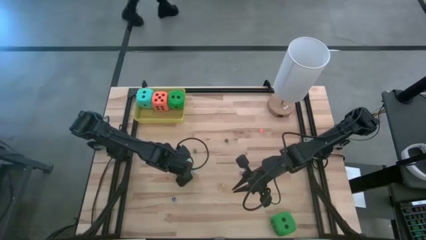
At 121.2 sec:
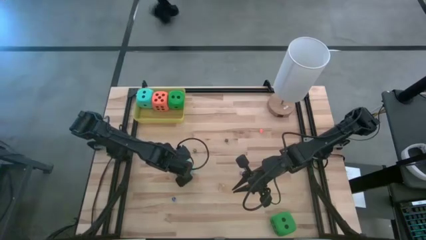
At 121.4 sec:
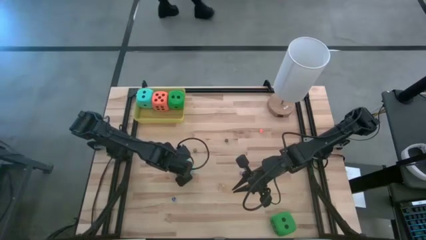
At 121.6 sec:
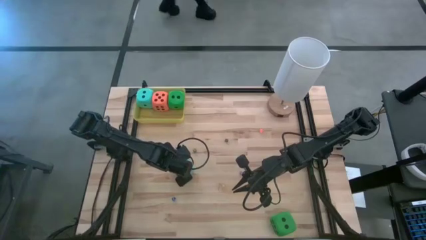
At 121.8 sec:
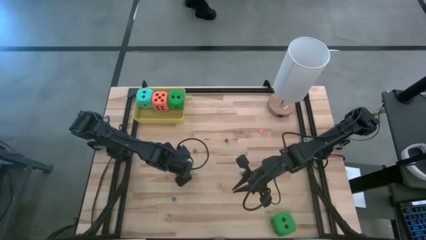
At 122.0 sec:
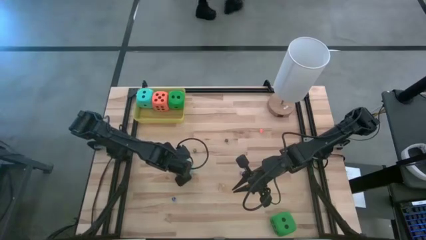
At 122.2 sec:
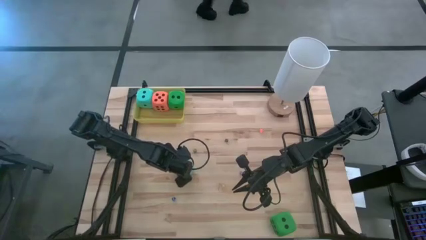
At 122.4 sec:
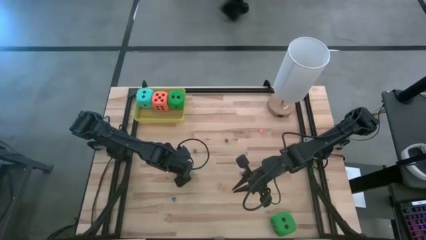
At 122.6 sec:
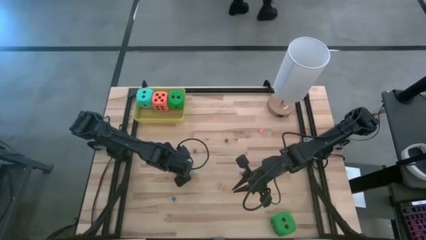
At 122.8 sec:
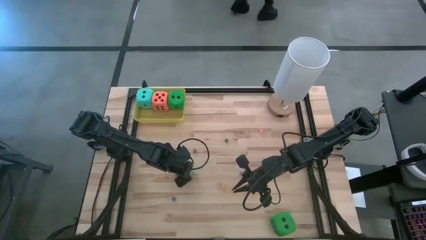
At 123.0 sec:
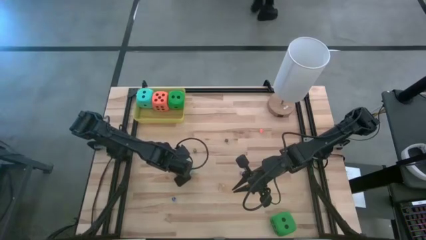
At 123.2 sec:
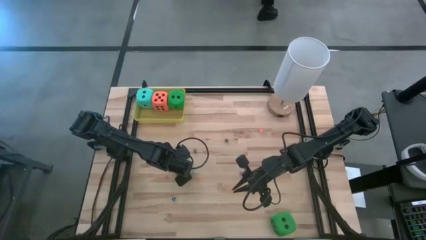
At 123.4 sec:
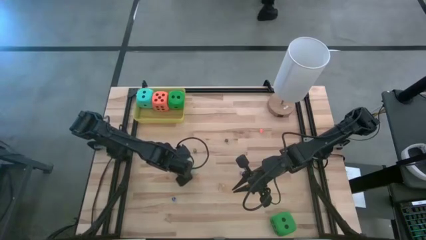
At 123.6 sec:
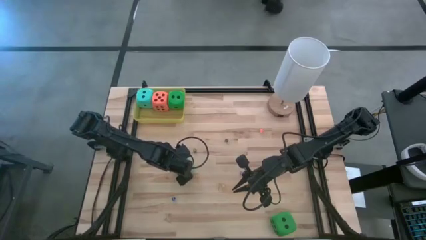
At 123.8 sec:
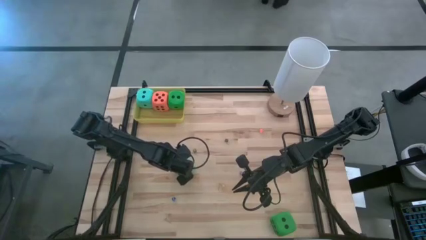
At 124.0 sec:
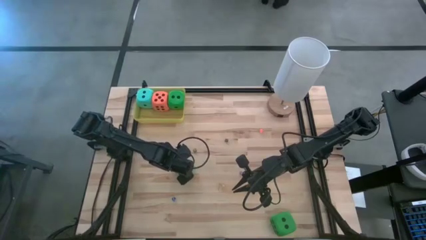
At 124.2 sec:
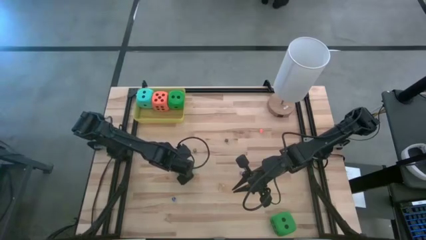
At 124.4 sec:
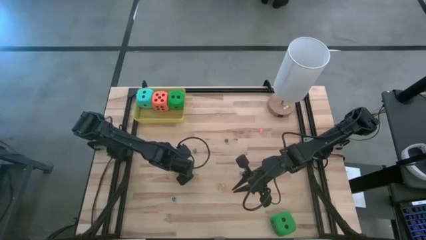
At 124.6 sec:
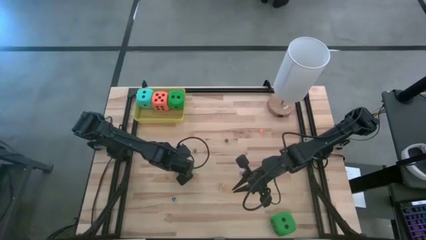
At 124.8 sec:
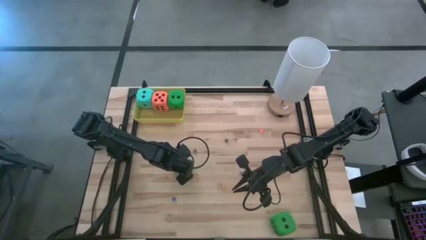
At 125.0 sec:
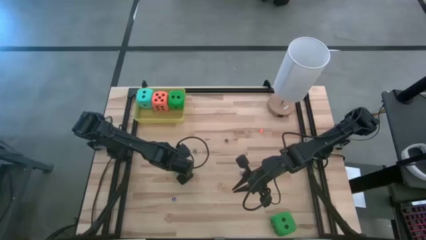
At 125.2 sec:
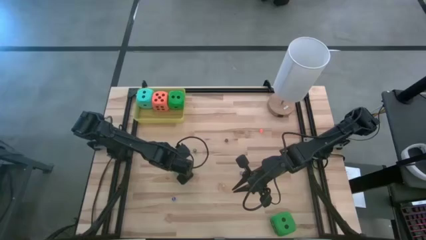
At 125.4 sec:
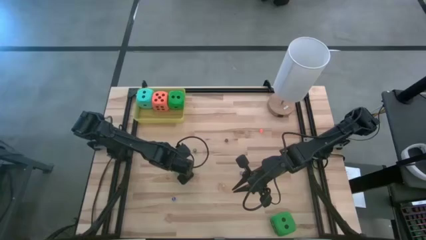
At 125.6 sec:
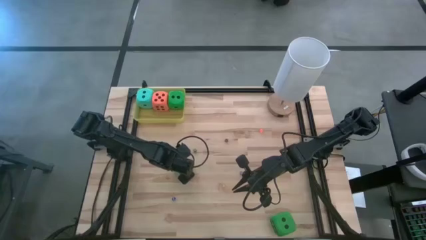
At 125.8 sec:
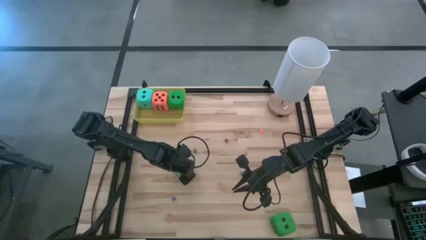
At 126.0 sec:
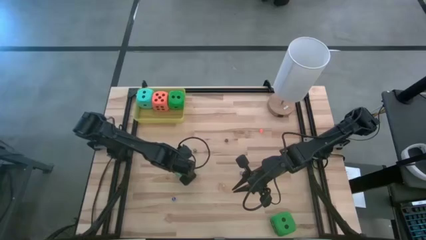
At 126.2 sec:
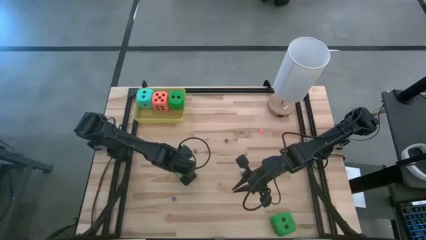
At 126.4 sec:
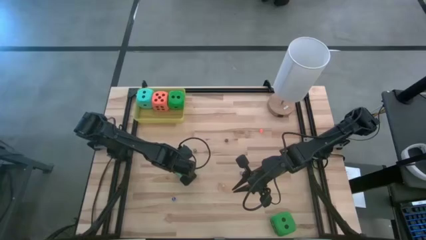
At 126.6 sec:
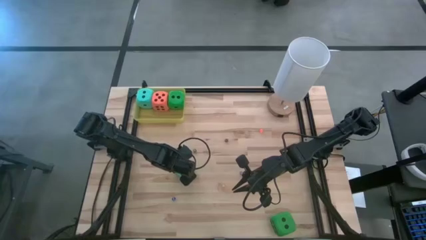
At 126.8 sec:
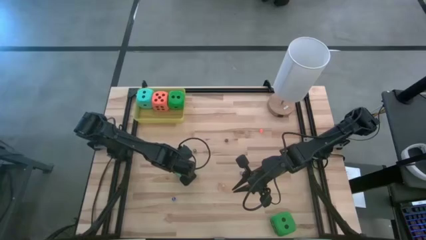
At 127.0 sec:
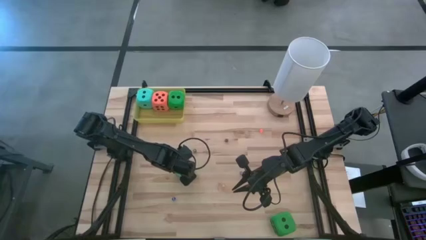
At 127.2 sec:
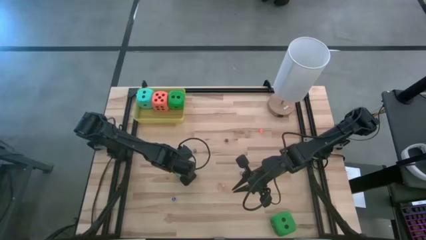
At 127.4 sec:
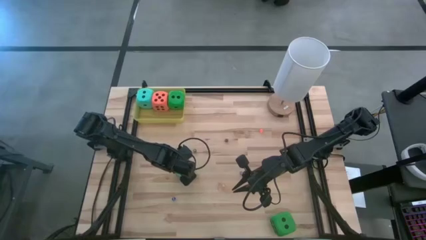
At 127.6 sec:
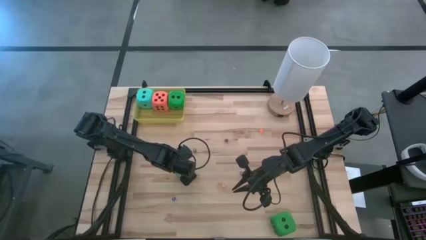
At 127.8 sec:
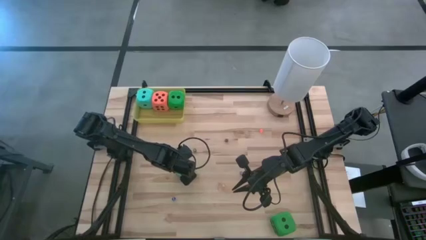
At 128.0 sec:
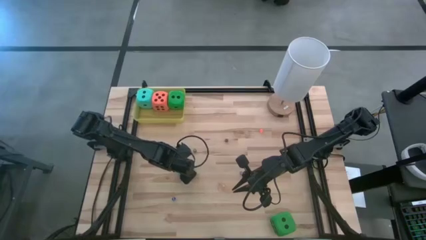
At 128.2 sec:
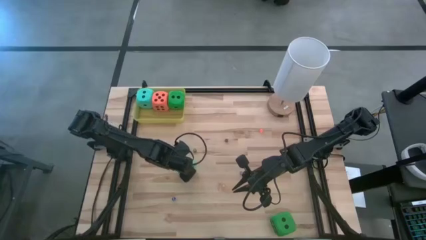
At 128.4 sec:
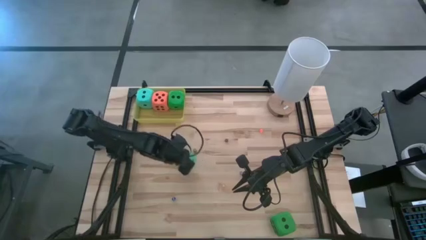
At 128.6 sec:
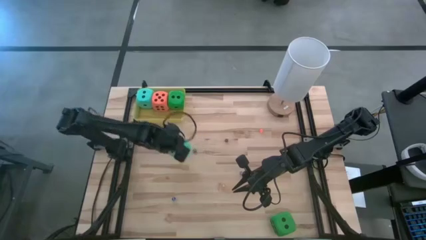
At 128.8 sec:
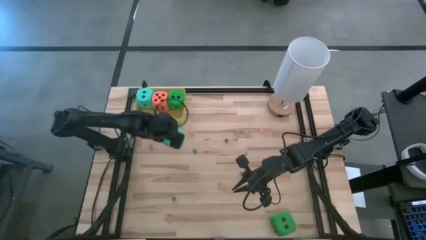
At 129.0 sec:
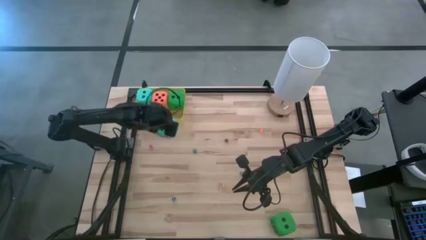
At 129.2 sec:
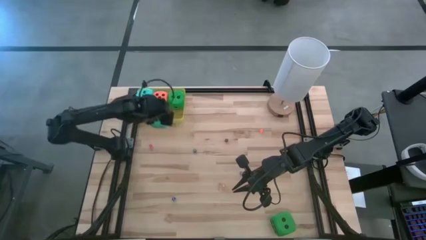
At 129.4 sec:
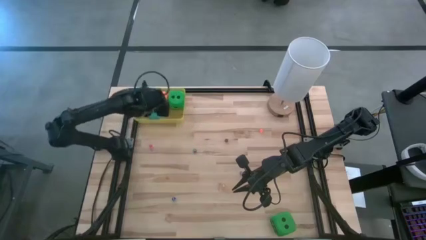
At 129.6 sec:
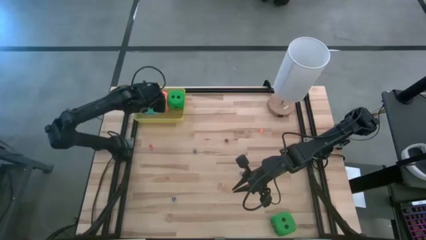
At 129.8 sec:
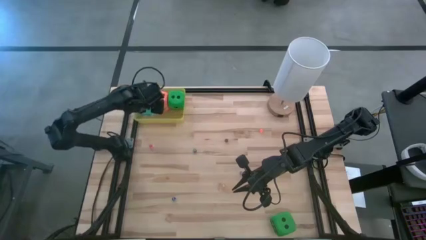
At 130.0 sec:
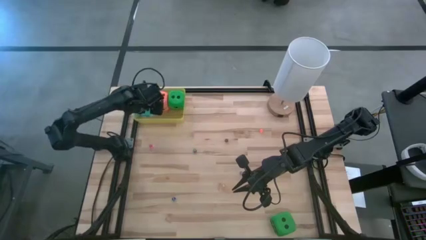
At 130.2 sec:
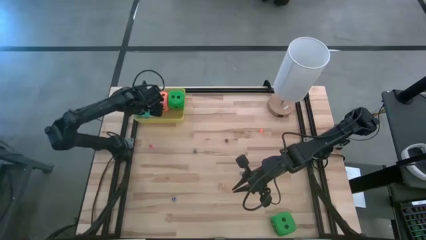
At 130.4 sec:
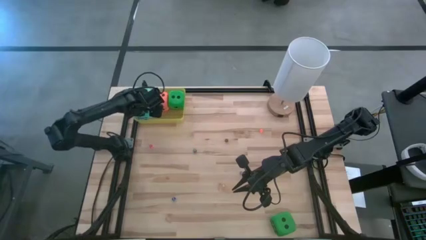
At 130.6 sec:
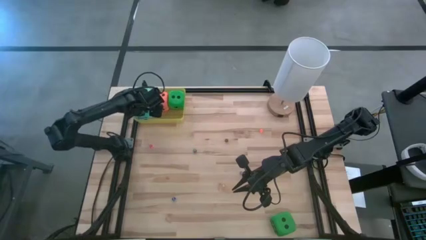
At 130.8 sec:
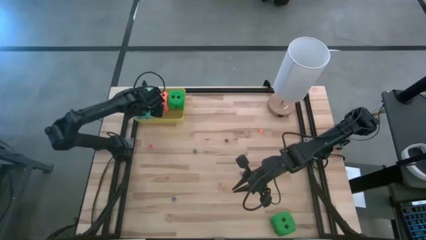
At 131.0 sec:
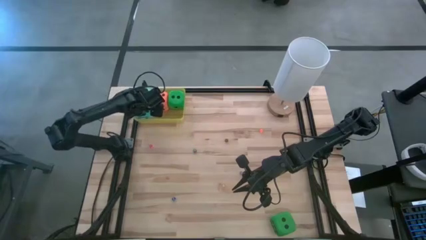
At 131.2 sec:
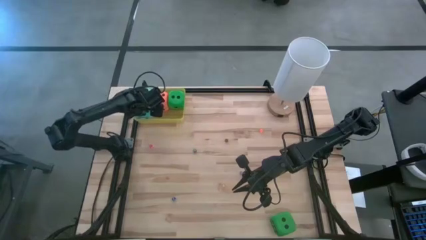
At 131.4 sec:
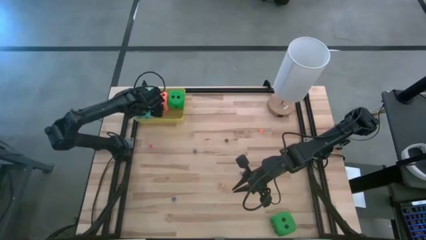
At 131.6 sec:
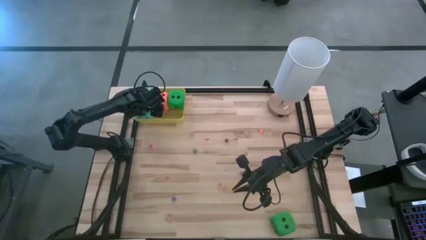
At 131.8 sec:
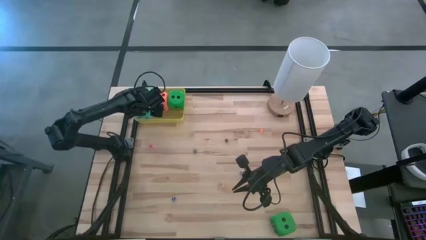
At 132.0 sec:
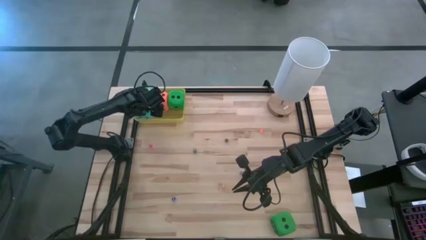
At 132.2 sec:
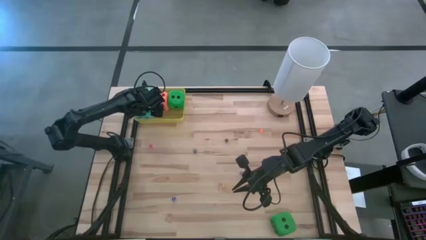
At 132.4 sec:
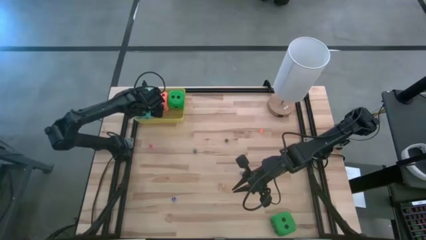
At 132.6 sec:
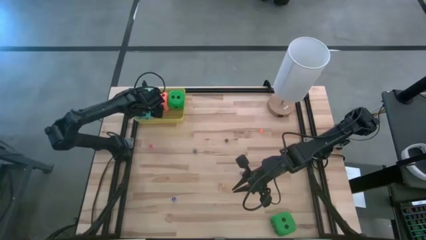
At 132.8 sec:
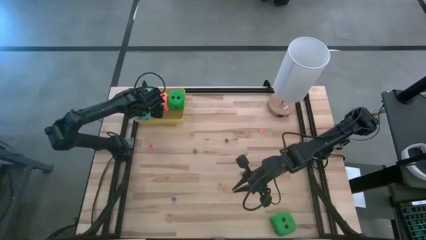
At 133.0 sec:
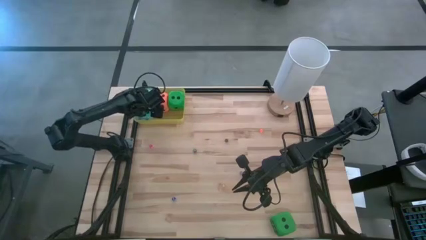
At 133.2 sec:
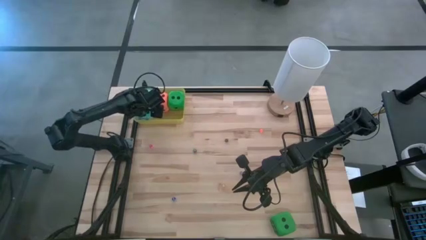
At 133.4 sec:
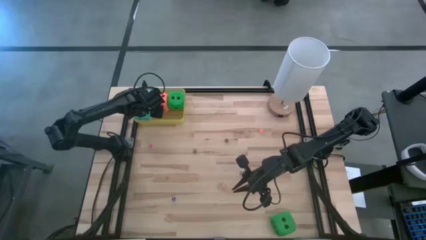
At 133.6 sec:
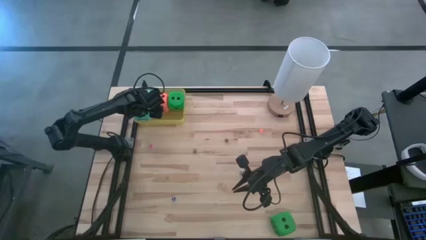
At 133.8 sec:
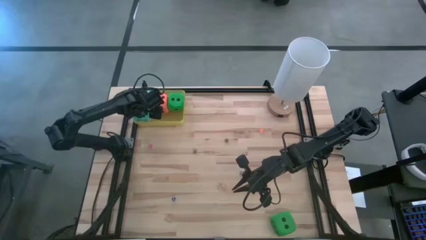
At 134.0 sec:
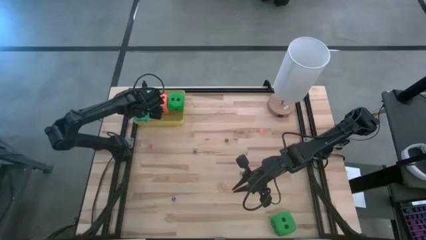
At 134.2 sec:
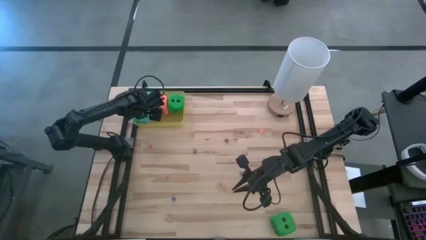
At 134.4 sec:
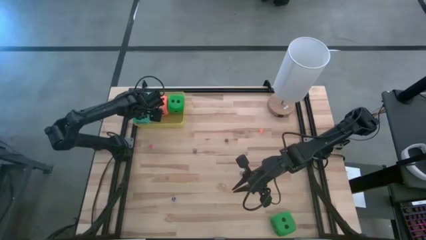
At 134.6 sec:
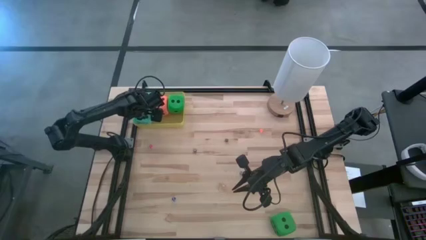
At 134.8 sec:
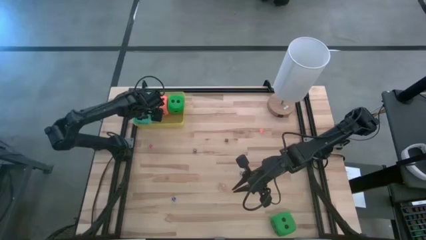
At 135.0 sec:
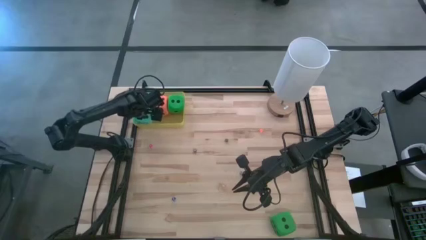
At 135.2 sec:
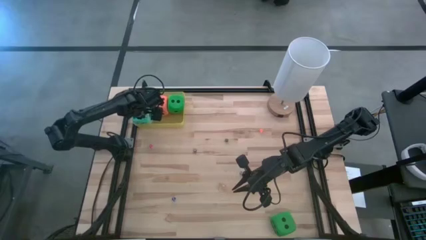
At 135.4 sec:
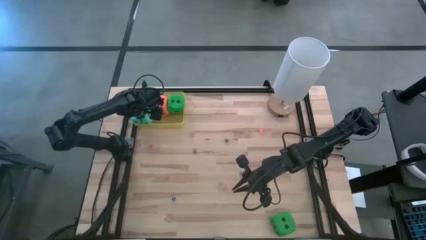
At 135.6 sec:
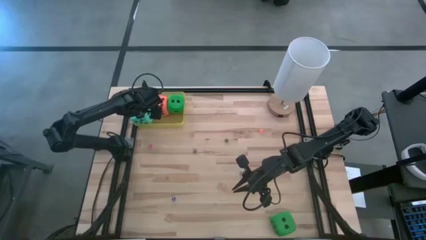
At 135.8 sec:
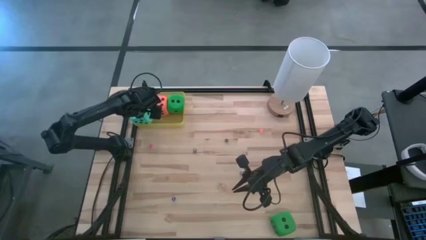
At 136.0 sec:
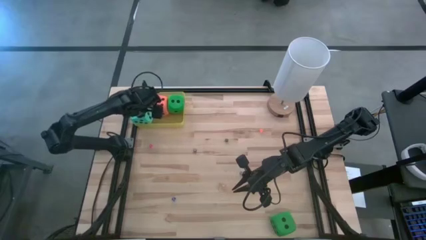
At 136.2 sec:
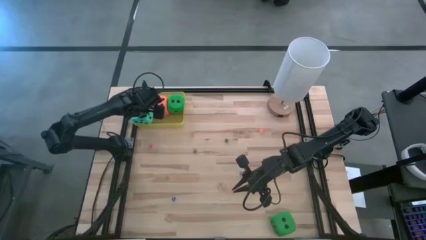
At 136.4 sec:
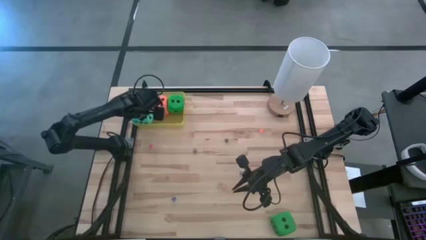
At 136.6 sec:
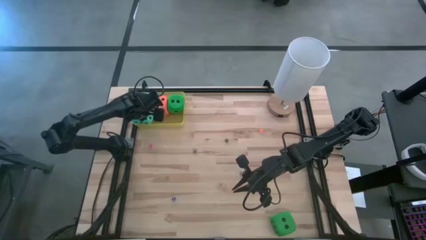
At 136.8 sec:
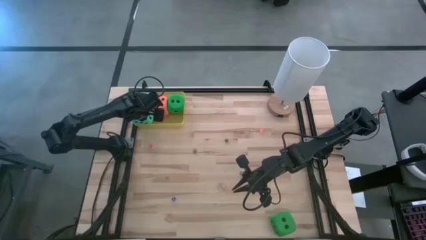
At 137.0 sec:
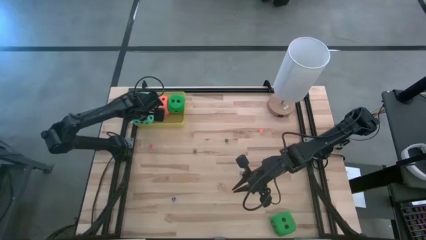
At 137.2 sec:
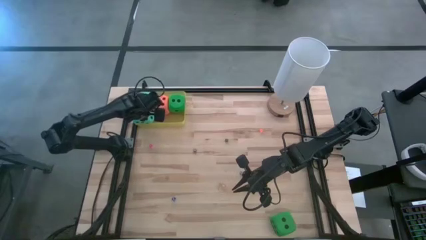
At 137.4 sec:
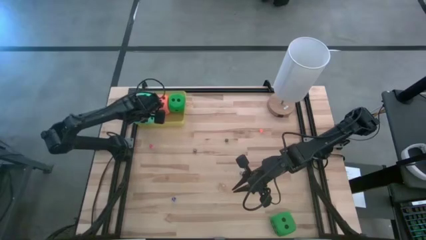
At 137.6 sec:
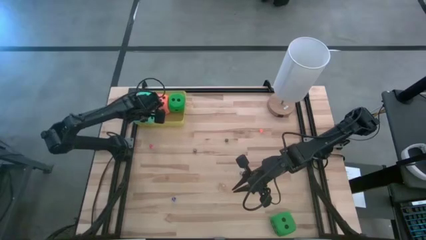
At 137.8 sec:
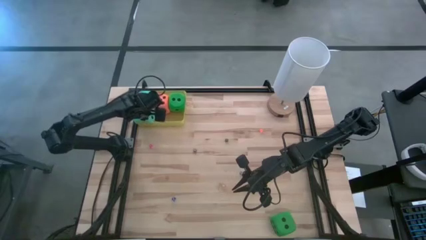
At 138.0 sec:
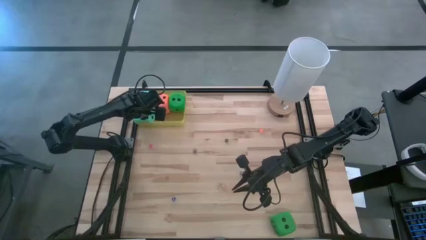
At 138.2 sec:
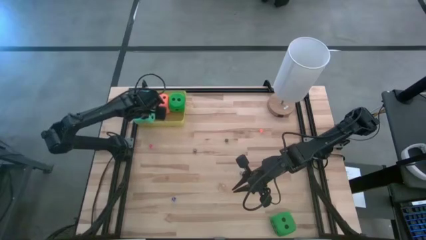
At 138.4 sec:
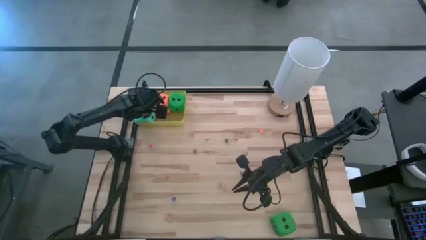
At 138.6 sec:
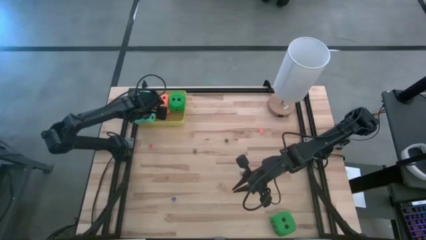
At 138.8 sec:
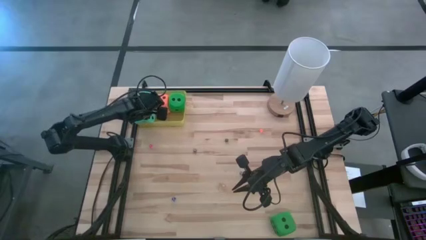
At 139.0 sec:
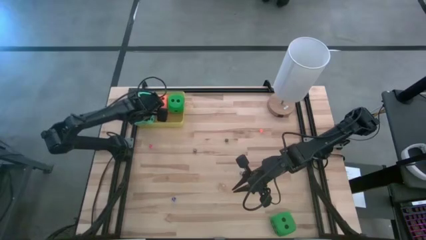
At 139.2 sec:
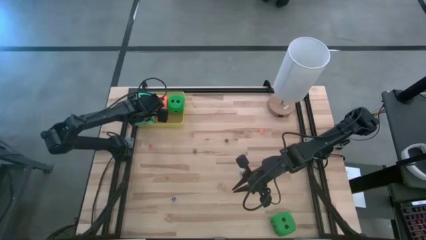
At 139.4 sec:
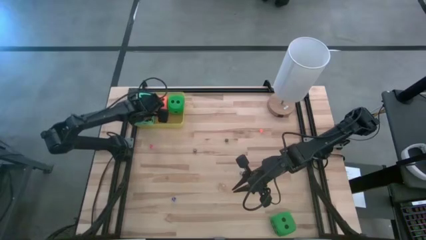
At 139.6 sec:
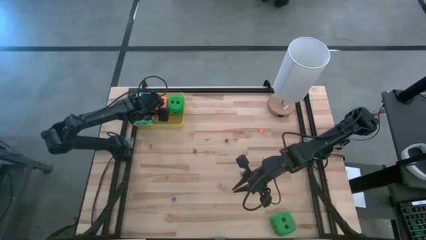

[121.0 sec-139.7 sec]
Task: Pick & Place Dice
Put the blue large die into the yellow container
